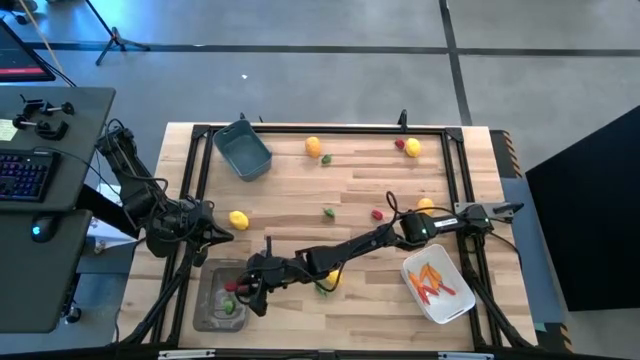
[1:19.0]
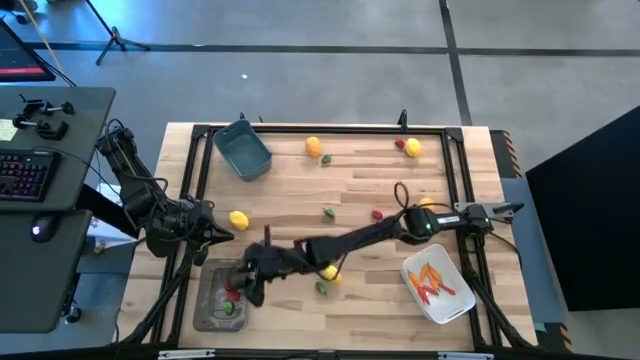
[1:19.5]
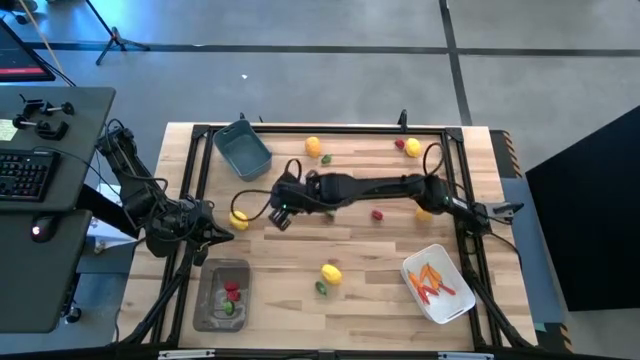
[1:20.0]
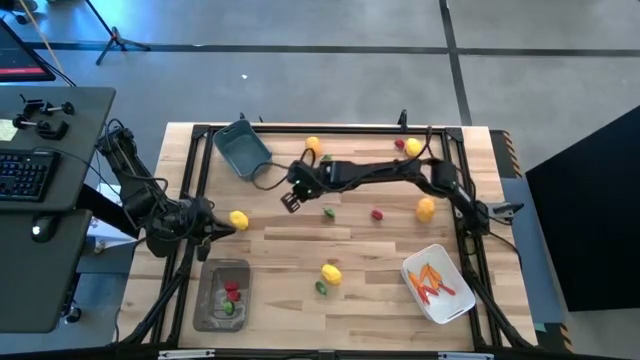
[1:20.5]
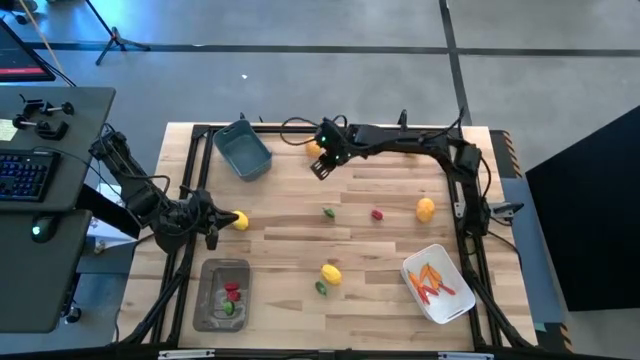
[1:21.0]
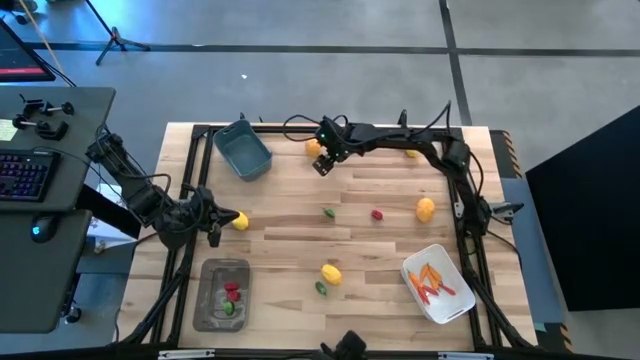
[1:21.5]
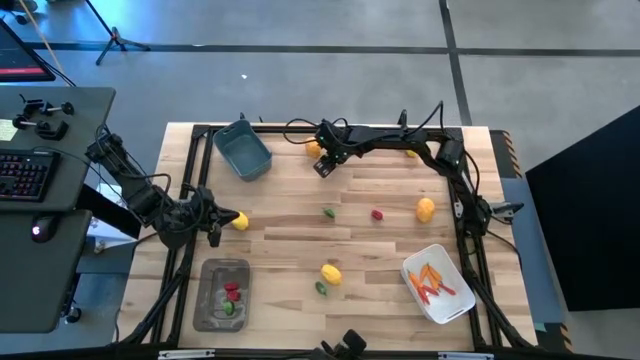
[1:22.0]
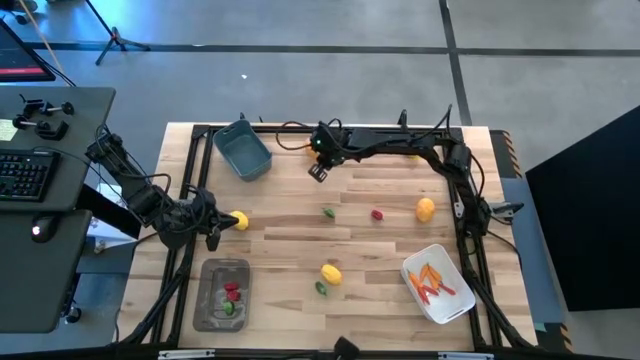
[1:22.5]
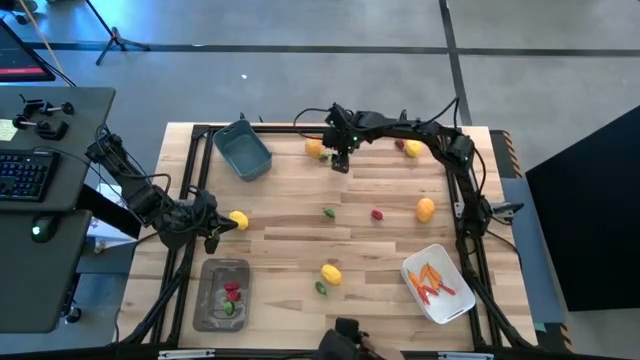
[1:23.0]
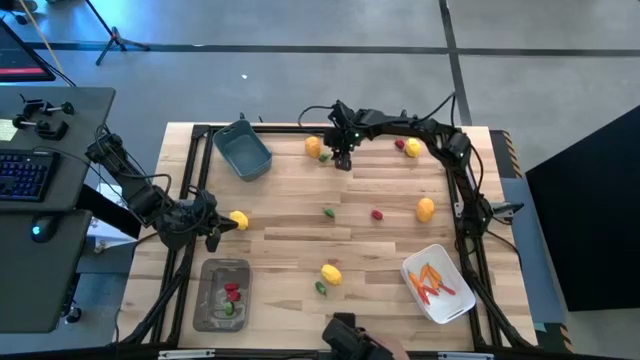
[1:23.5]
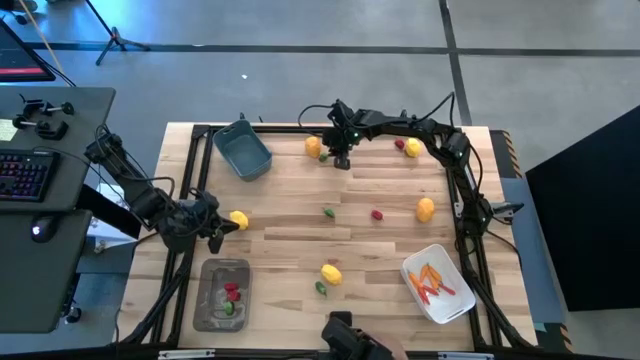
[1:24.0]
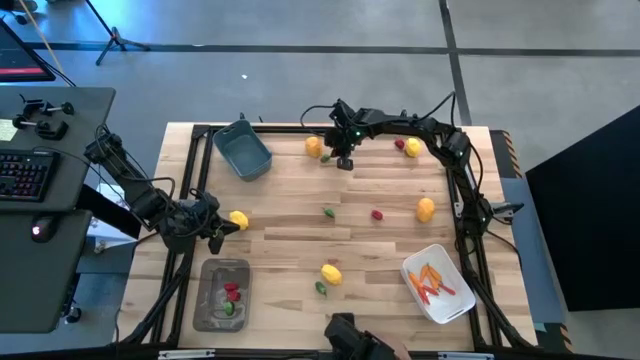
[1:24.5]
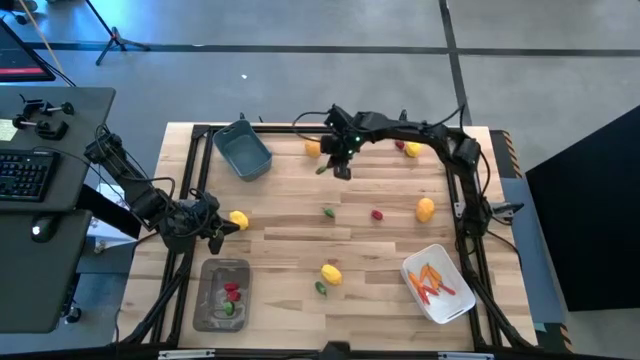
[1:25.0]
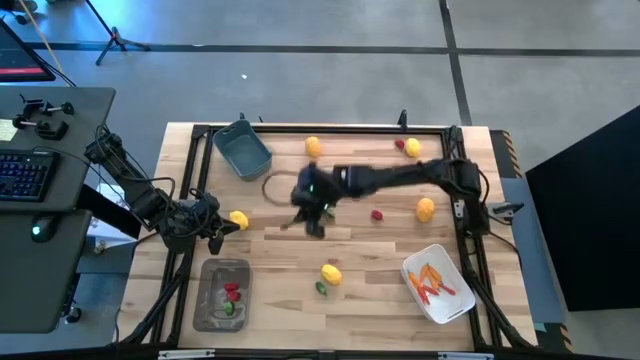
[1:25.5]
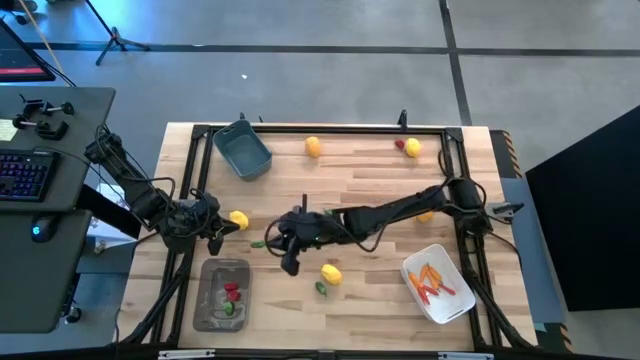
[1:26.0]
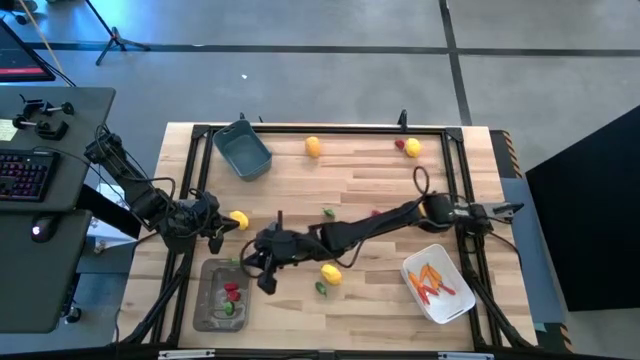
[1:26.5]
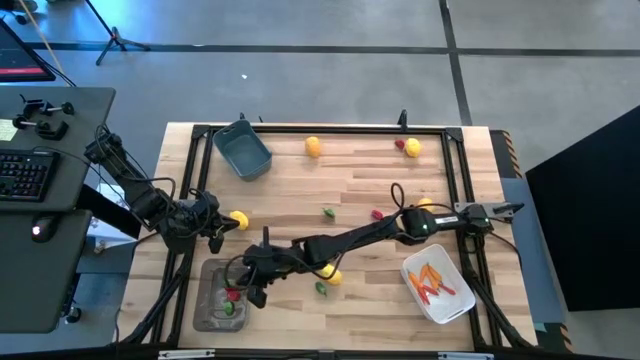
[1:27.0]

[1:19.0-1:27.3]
Task: Sort produce into baskets
Put the green chili pepper into the black bin

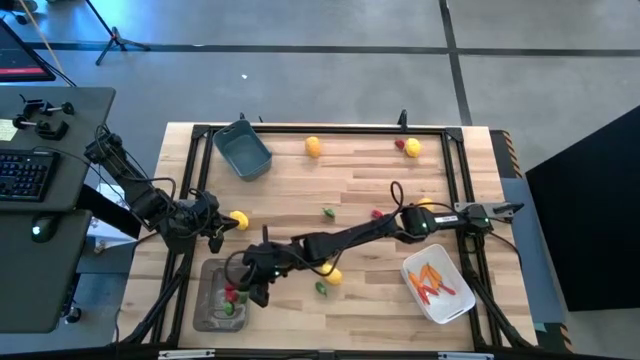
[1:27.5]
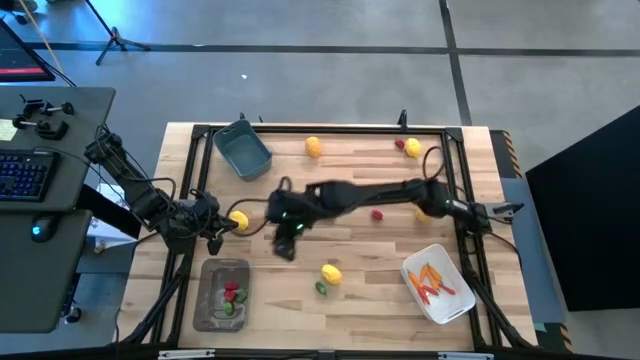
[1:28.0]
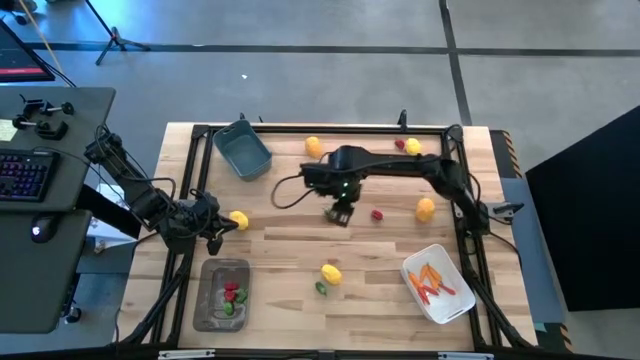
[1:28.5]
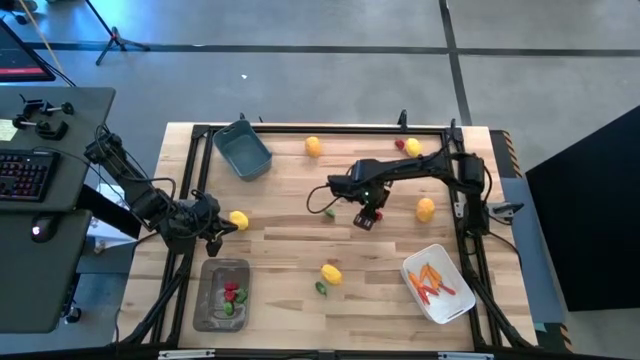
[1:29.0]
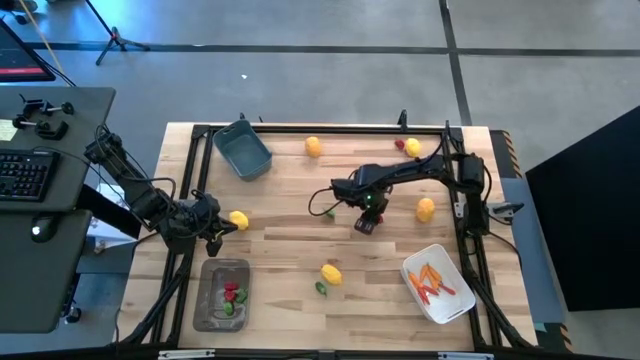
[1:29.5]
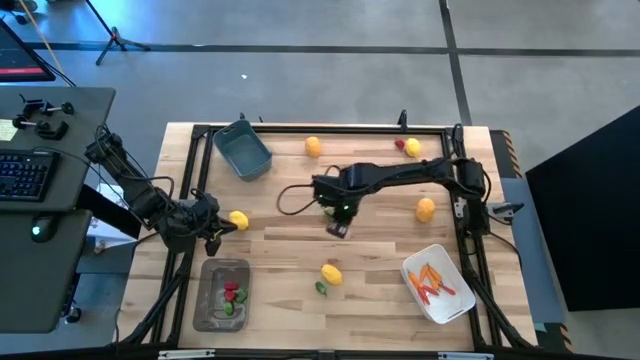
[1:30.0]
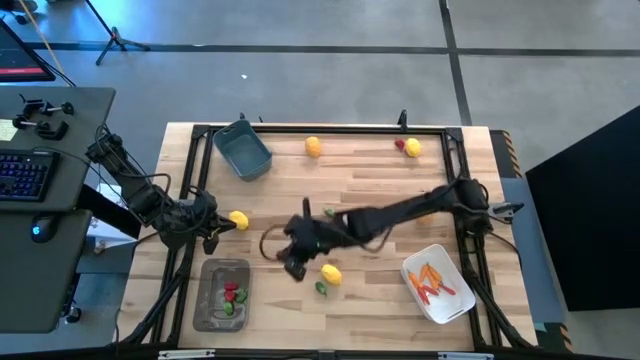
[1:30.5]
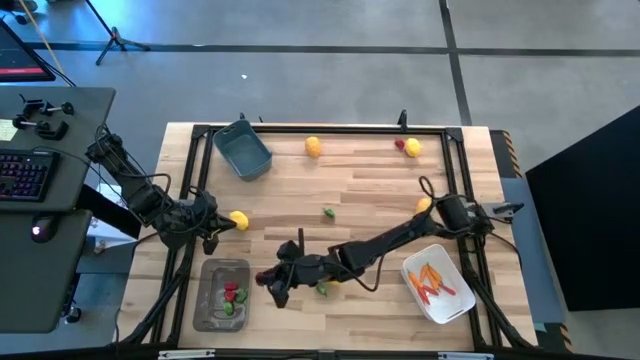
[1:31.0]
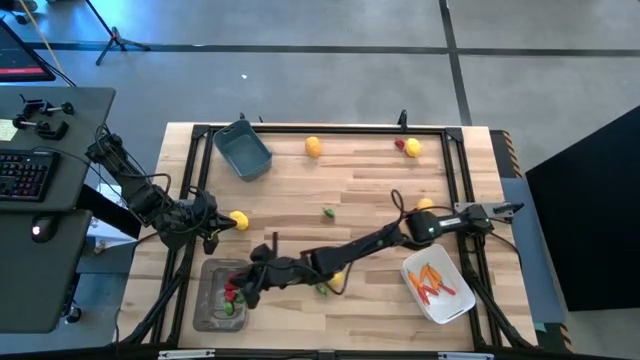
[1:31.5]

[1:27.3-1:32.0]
Put the red chili pepper into the black bin

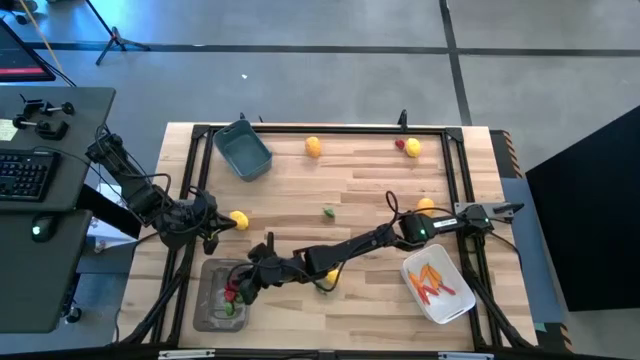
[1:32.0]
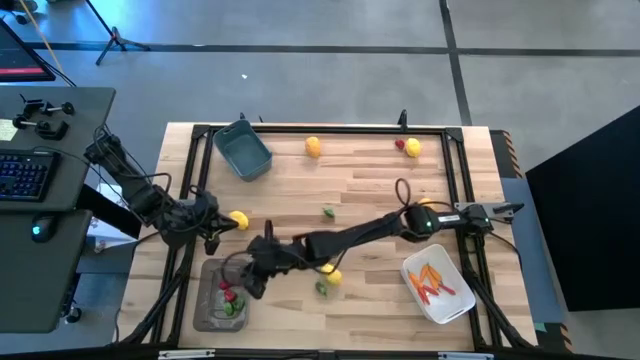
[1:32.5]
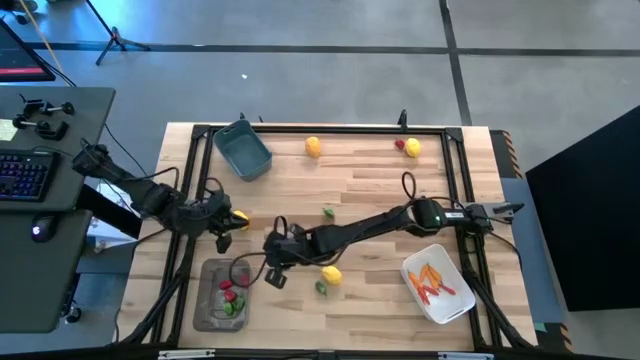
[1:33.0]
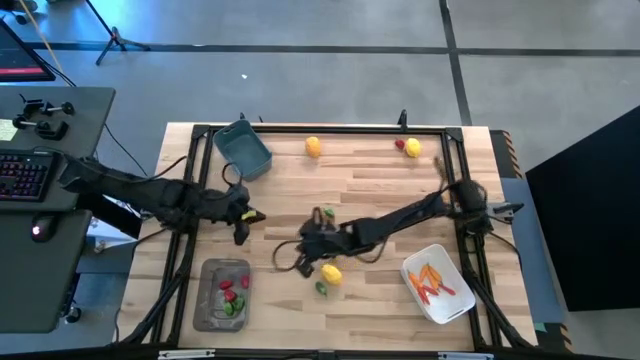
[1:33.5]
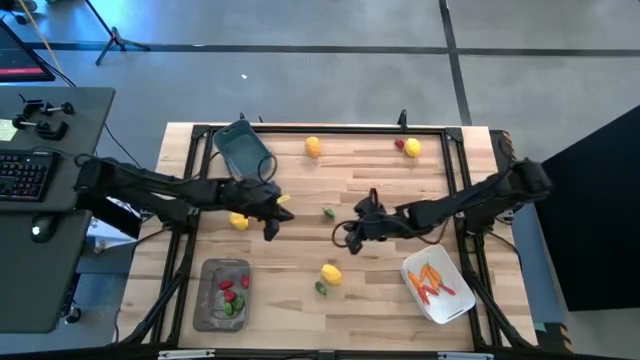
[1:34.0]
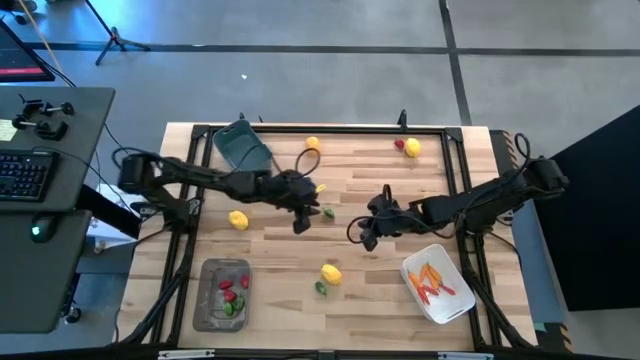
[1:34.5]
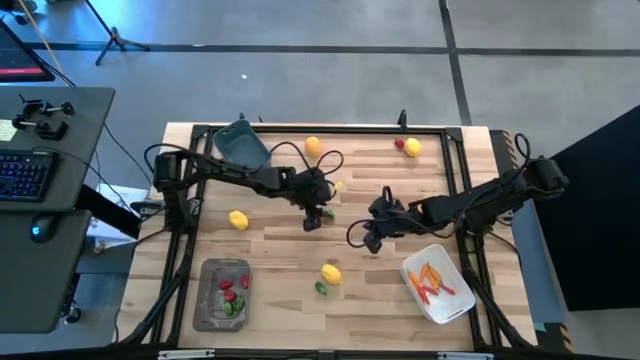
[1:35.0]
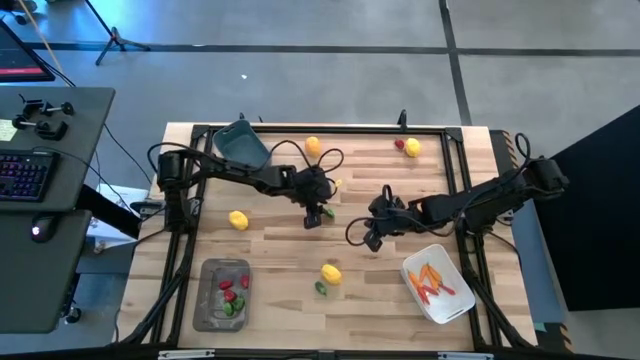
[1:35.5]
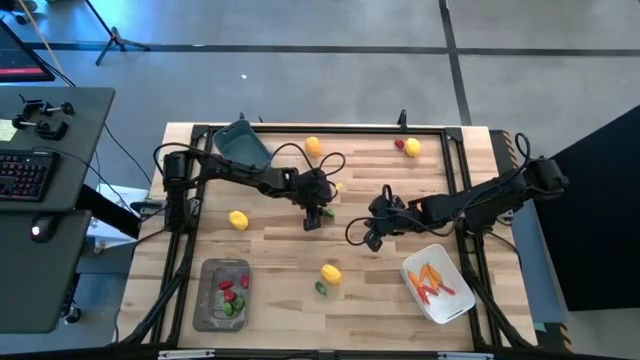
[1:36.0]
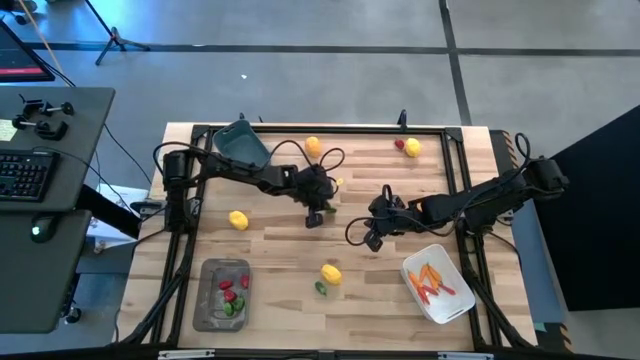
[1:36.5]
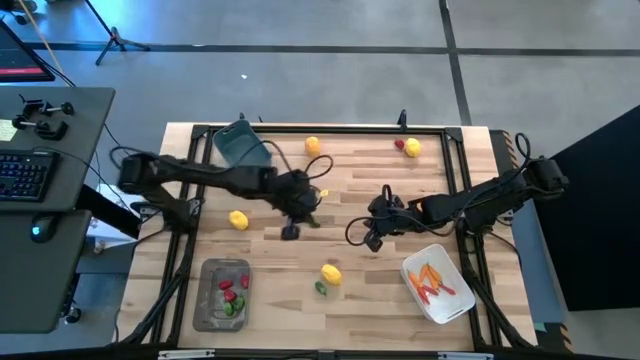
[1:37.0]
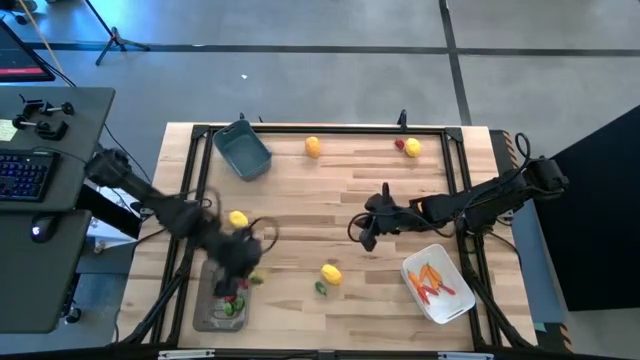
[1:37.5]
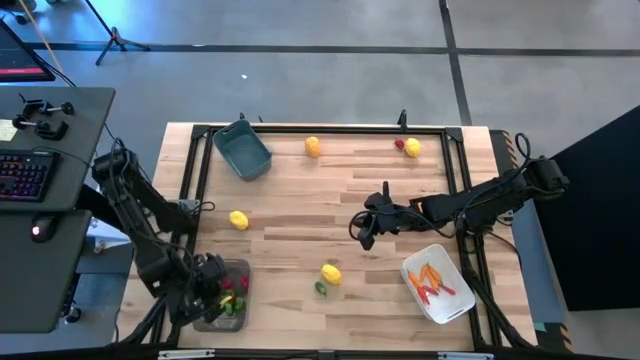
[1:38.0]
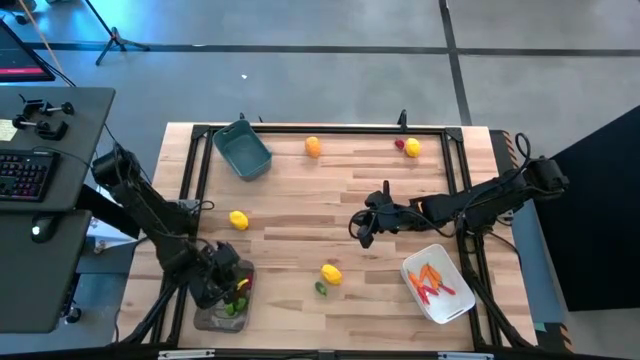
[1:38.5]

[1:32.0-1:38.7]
Put the green chili pepper into the black bin
